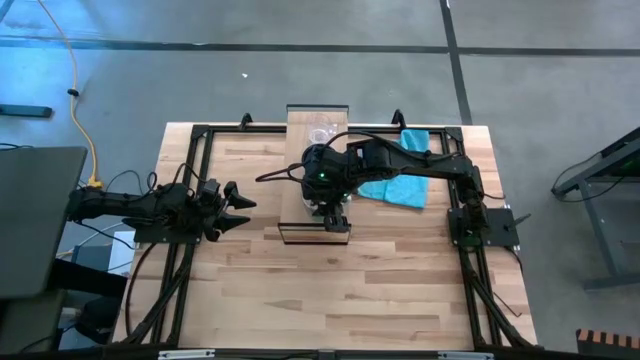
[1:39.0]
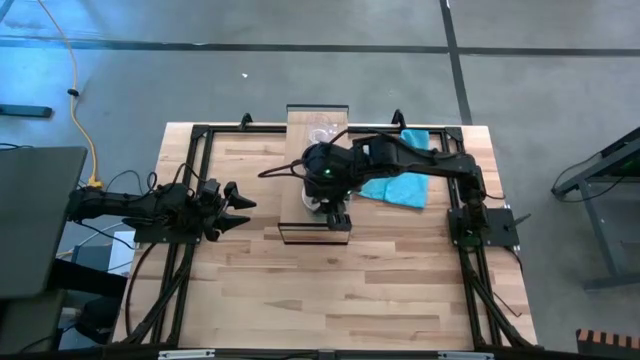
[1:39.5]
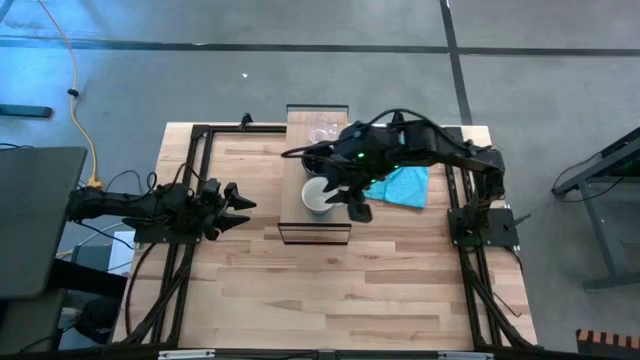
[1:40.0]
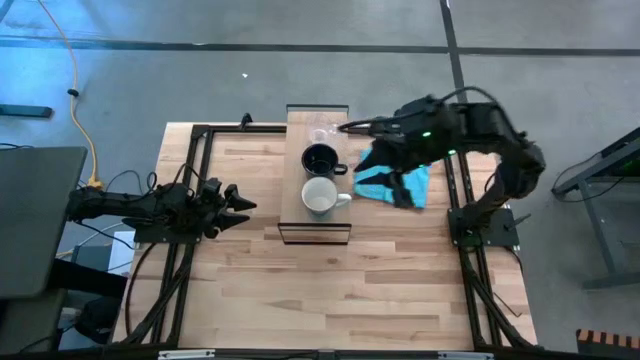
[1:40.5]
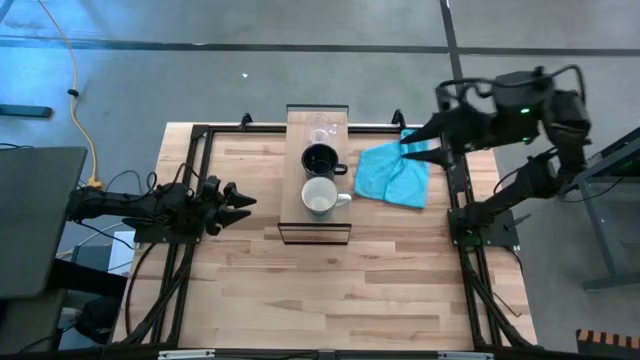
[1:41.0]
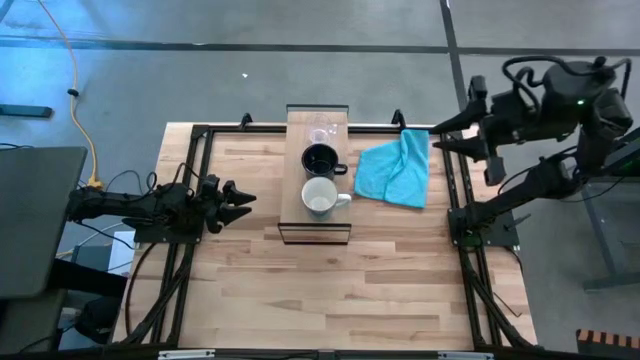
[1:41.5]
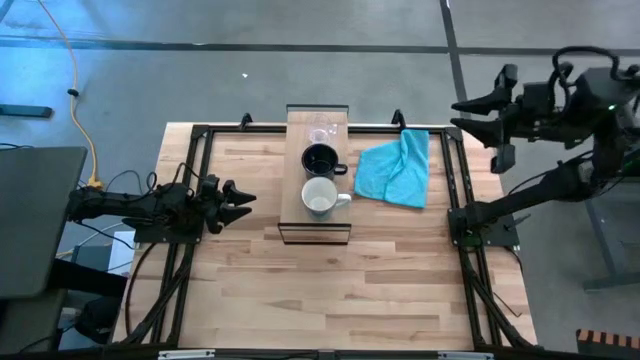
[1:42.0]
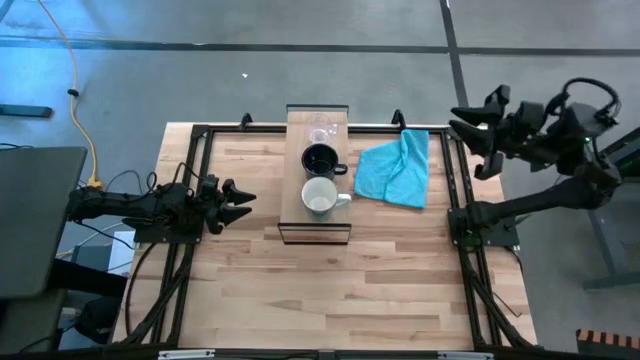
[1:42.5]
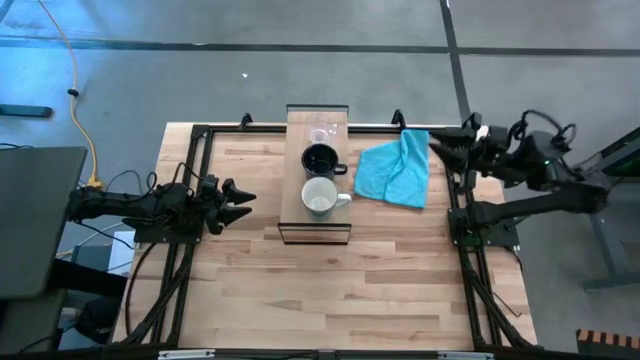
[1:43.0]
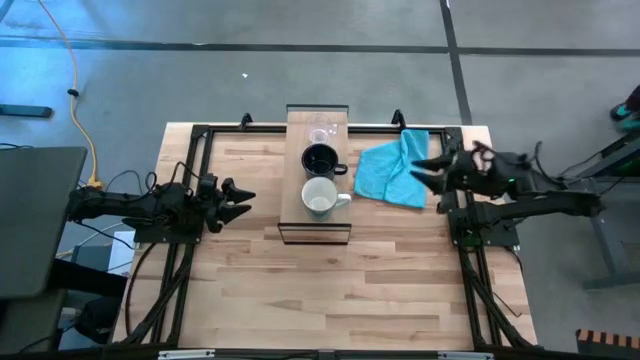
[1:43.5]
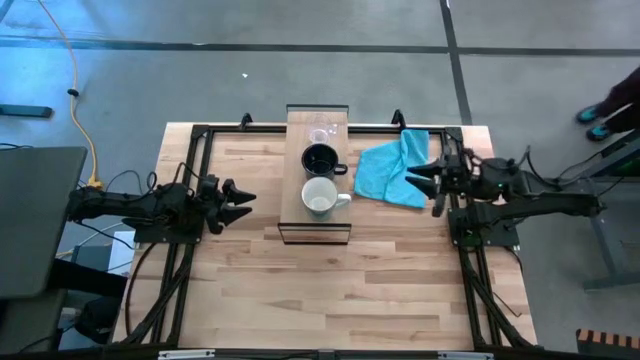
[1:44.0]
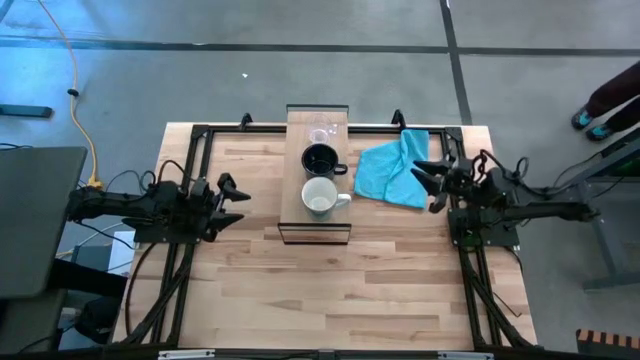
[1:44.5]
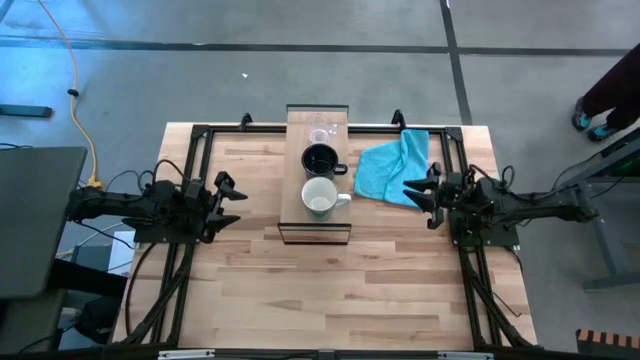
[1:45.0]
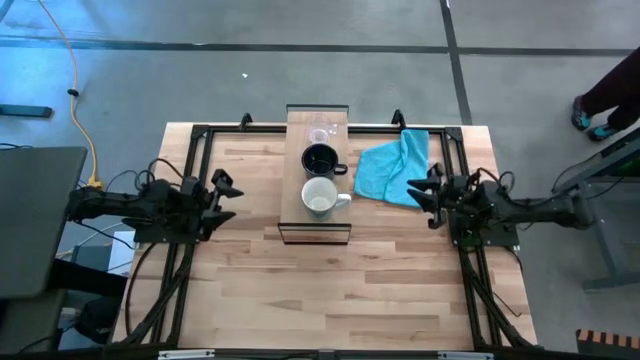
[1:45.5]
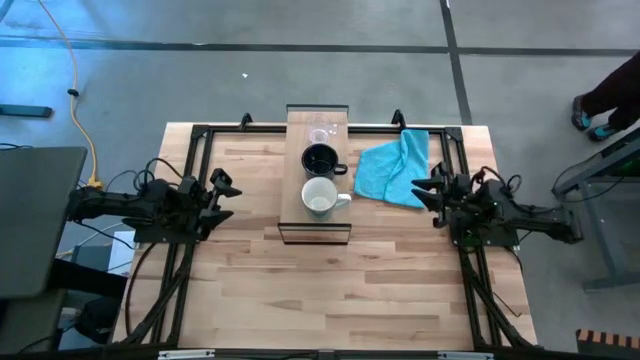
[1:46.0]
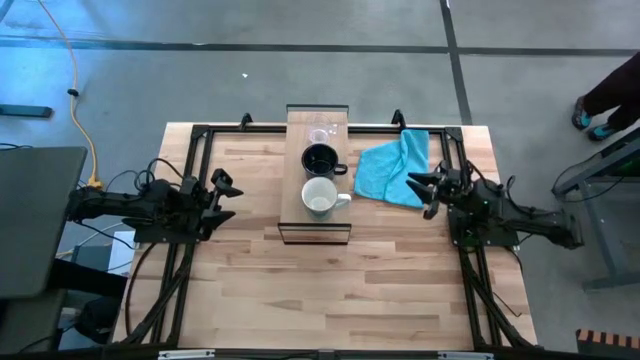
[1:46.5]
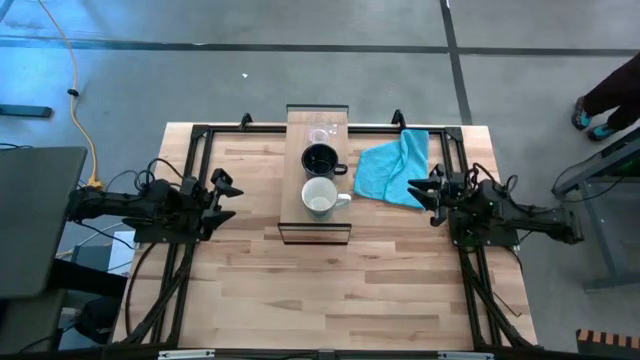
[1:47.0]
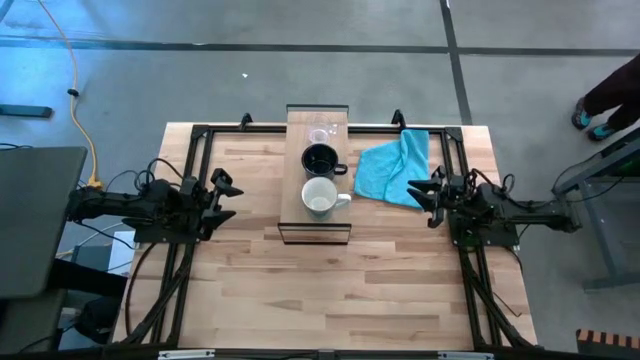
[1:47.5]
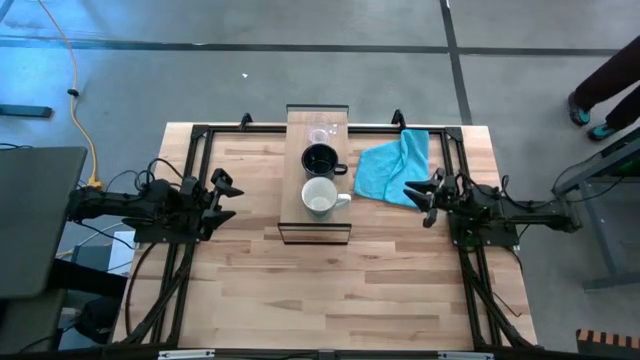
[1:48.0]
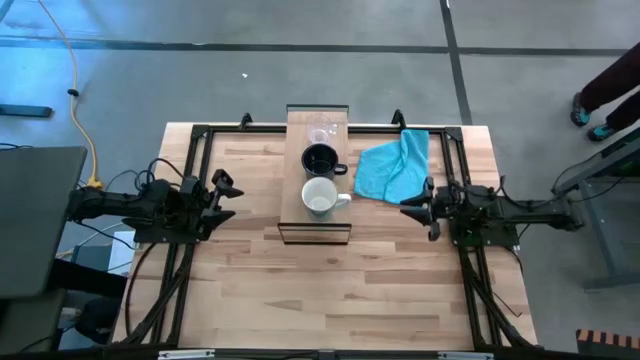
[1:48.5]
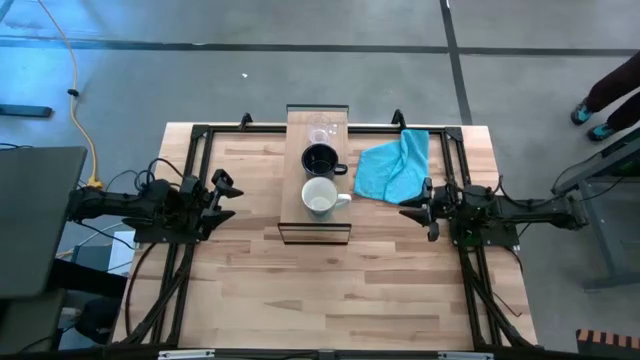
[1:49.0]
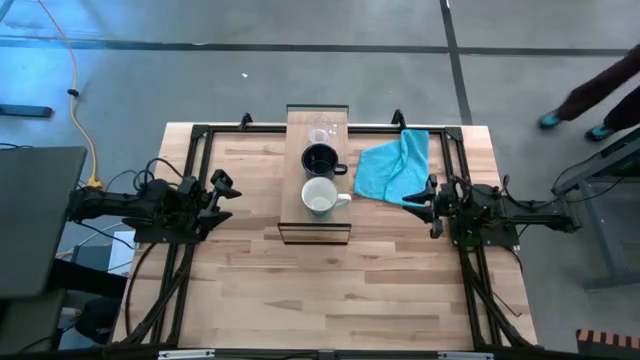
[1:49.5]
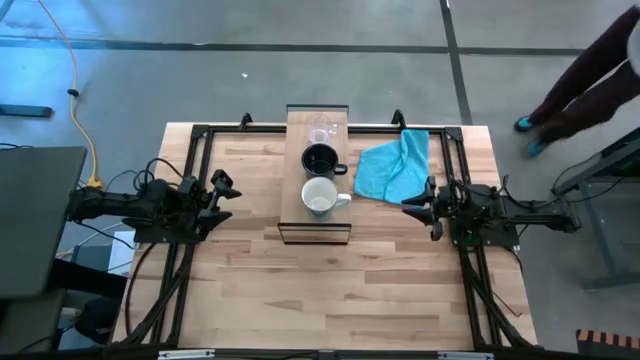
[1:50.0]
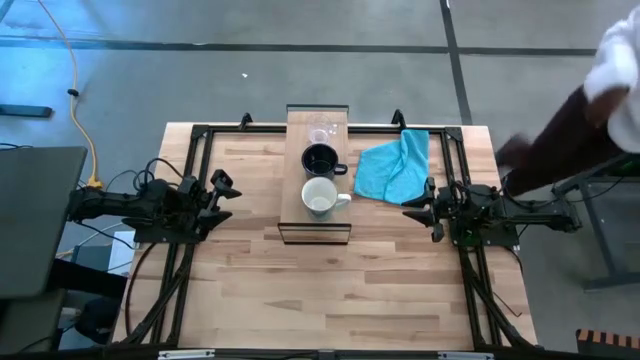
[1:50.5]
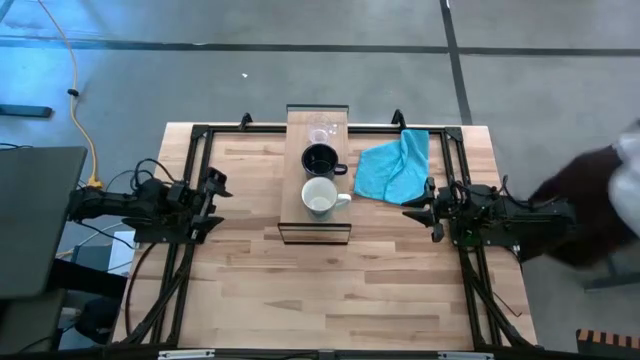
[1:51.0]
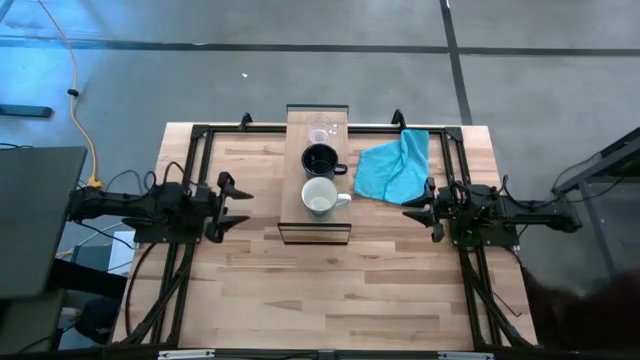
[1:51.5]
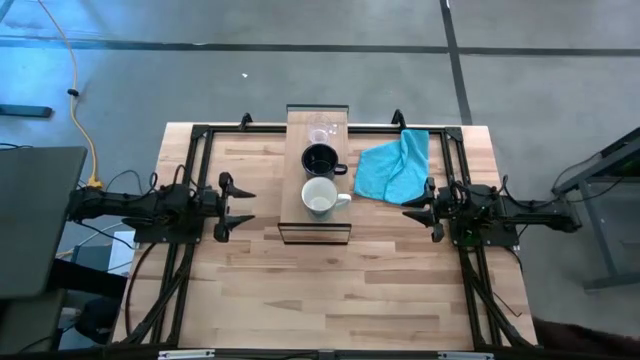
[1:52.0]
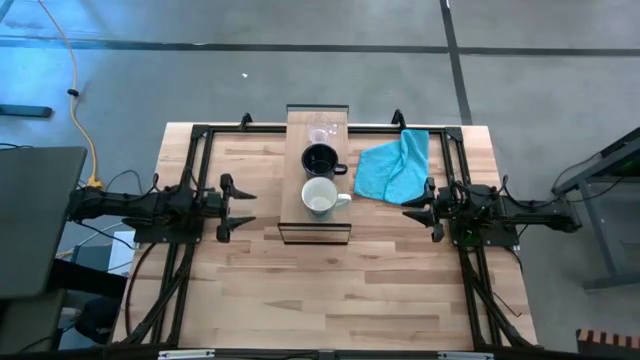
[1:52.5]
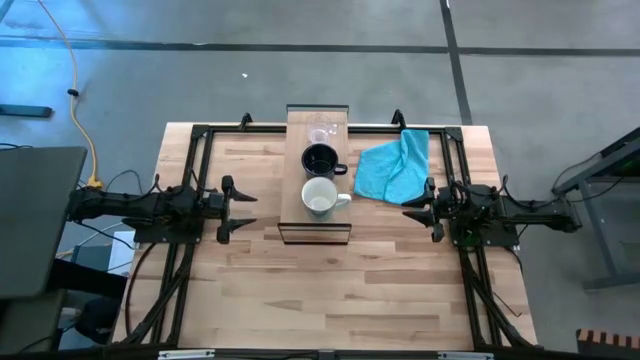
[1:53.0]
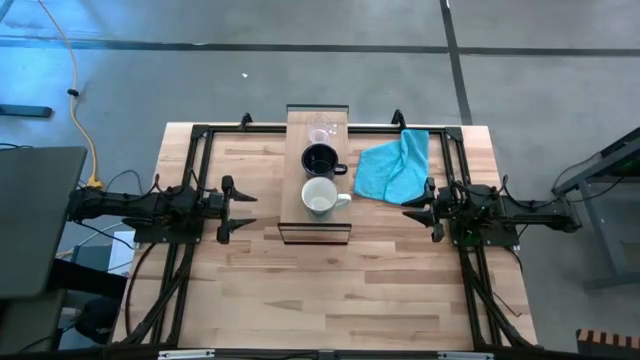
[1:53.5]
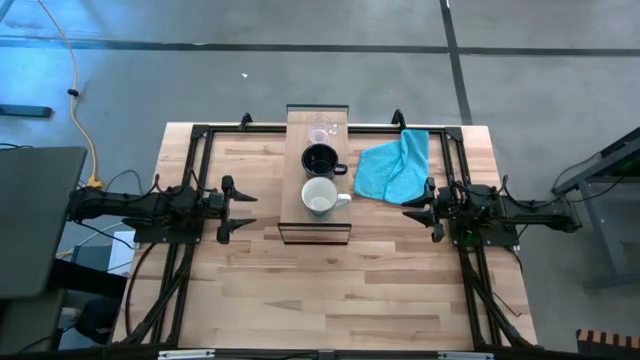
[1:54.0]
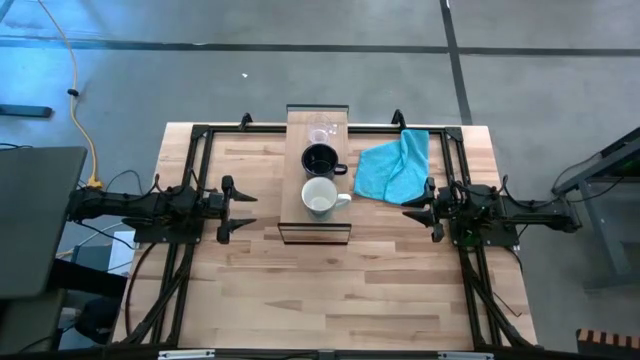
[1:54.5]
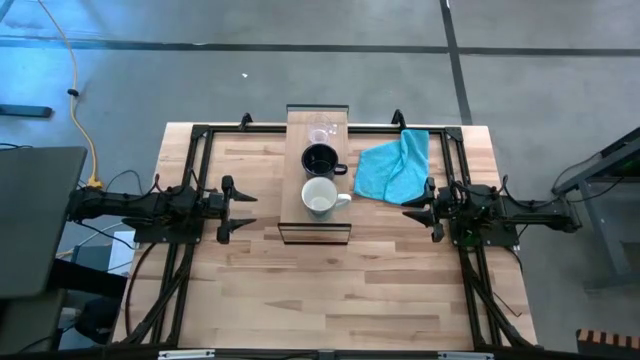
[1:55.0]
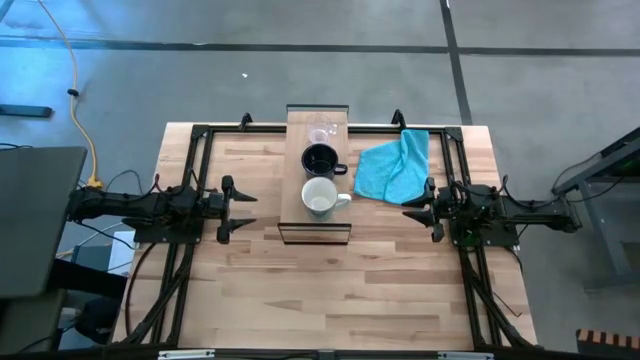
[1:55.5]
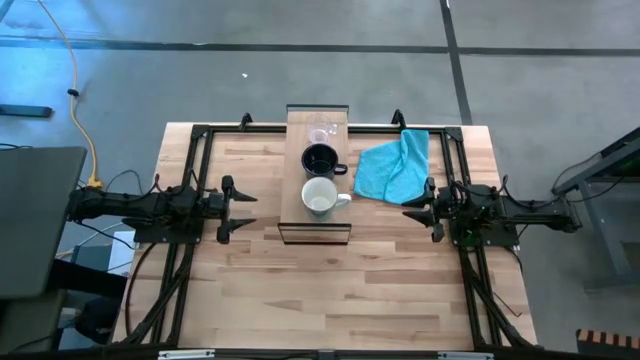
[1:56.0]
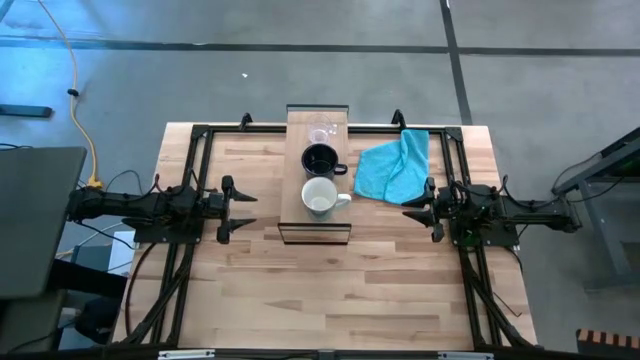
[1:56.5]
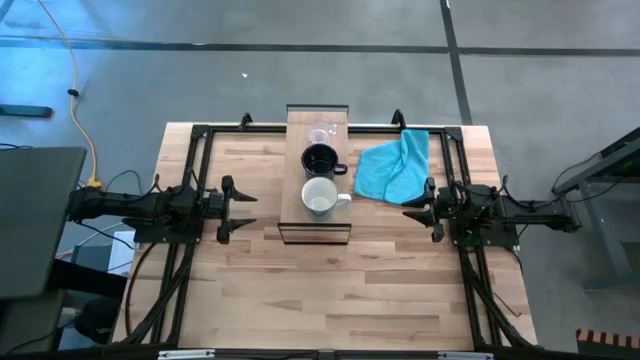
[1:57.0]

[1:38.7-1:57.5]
Task: Stack small to large cups/mugs on shelf
Return to Home Position

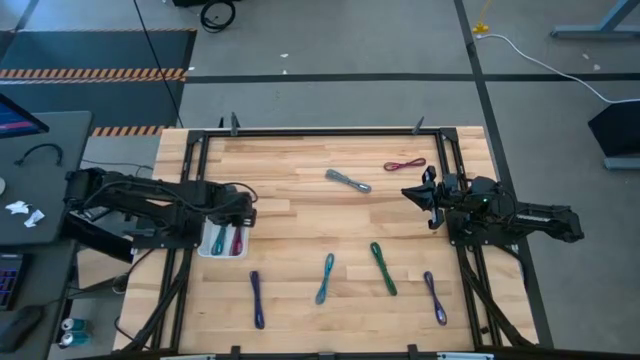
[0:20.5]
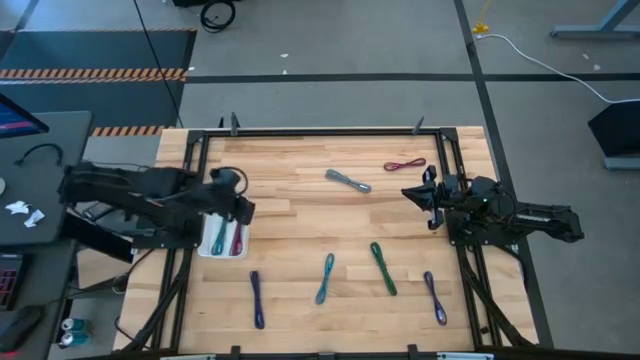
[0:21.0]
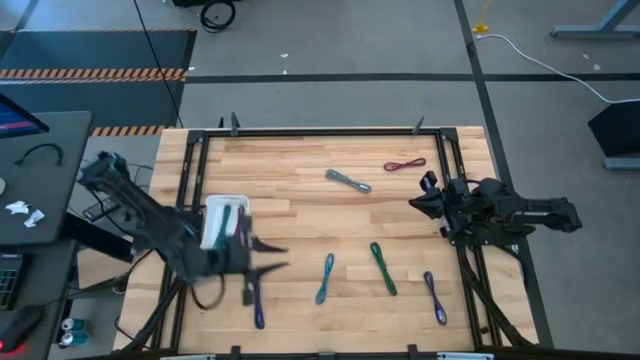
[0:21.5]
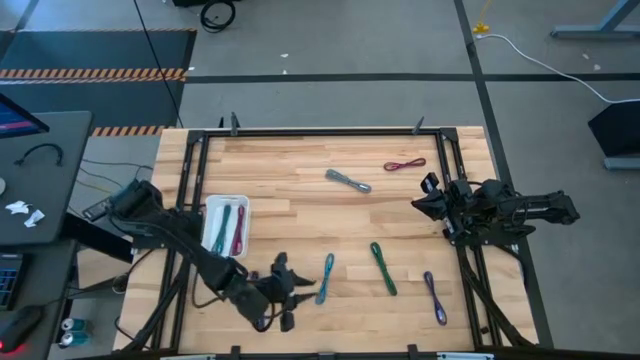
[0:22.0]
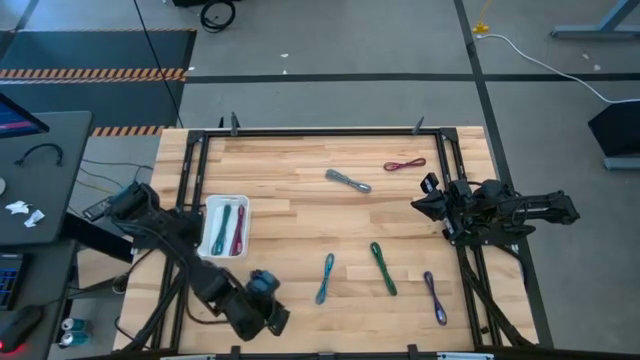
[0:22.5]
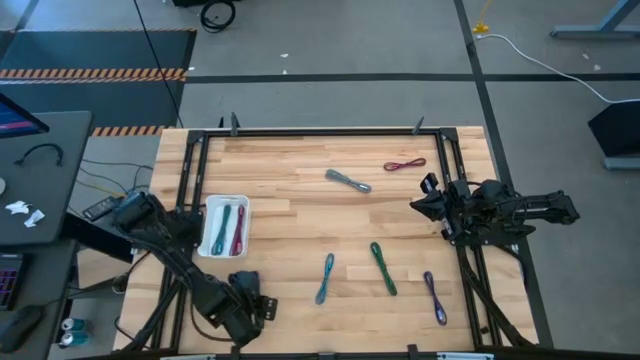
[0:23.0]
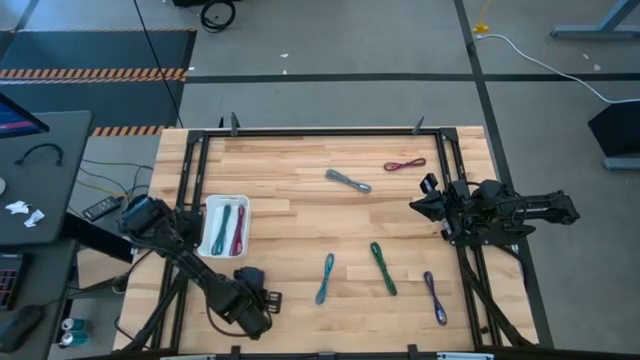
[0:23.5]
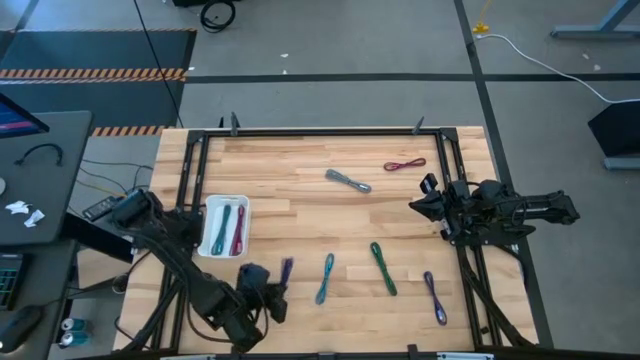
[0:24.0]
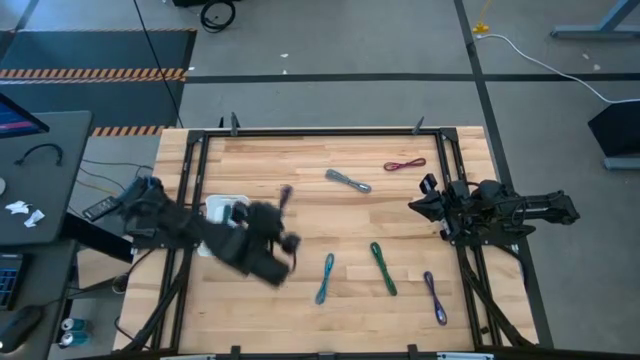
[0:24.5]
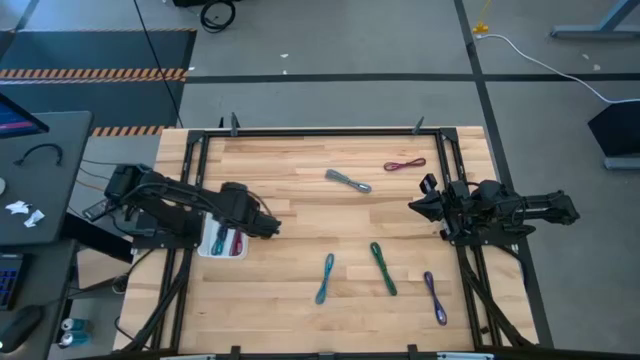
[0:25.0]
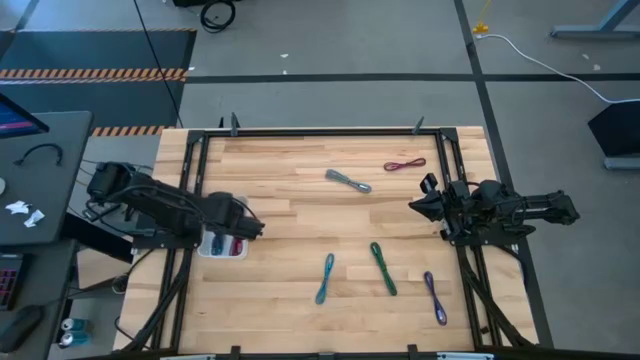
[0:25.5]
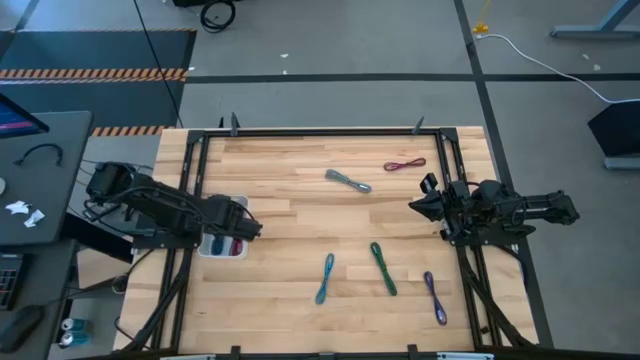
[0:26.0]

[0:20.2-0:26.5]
Task: Pick and place USB-C Cables
Put the left violet charger cable into the white bin
